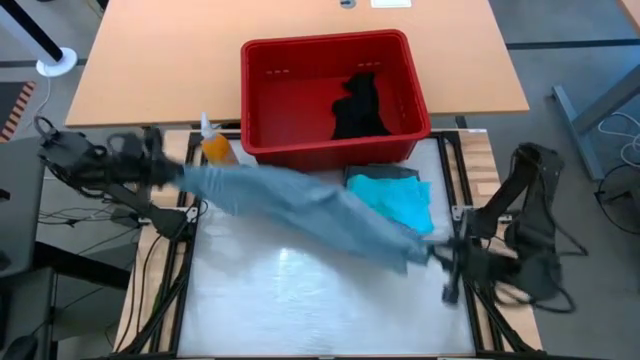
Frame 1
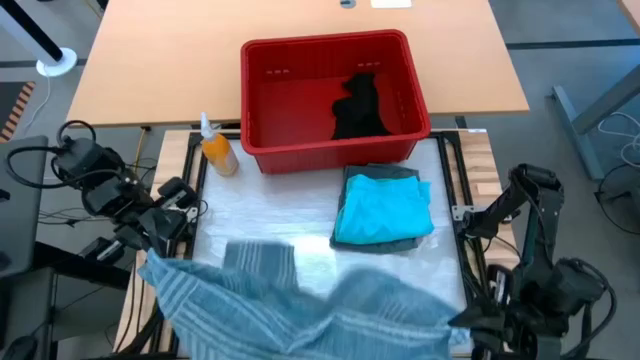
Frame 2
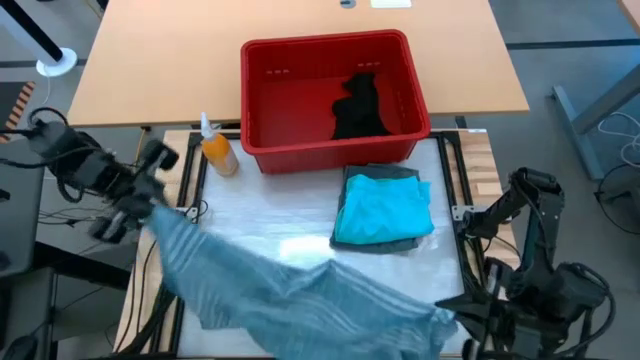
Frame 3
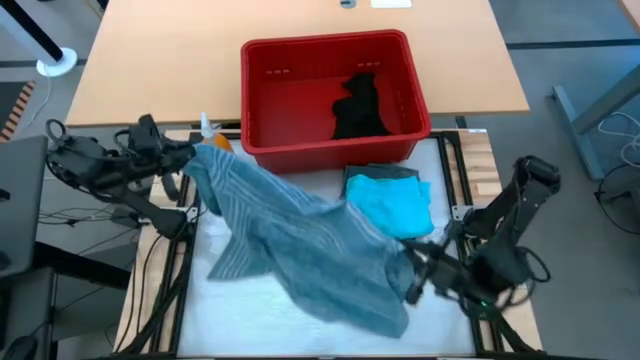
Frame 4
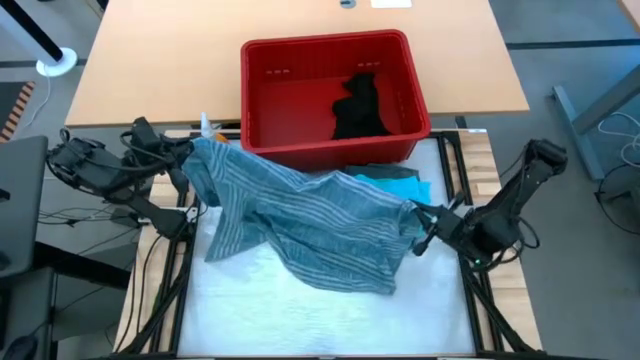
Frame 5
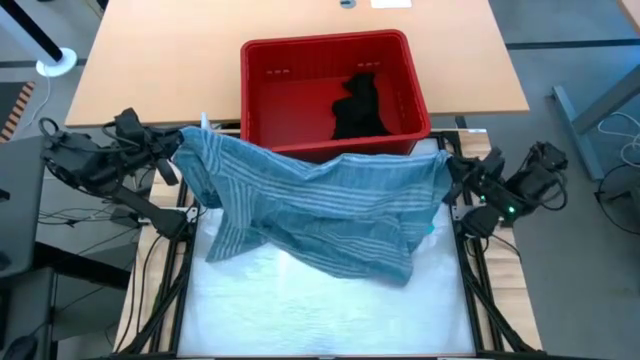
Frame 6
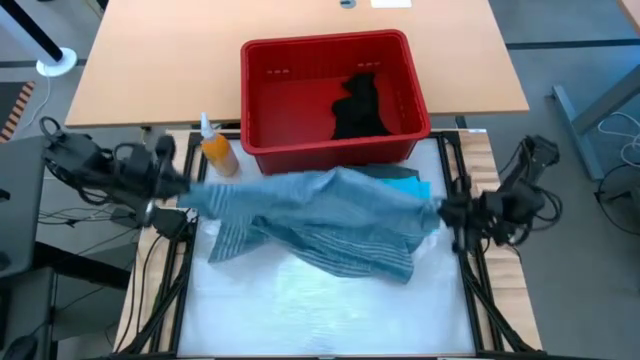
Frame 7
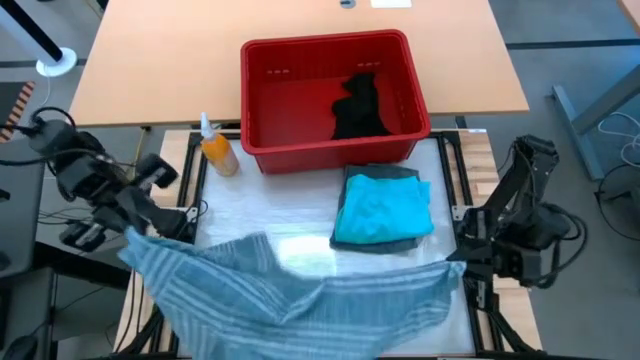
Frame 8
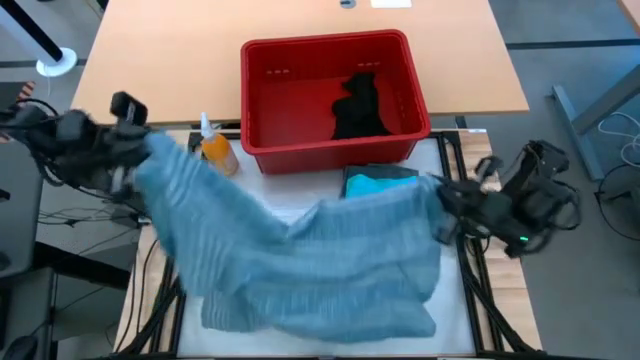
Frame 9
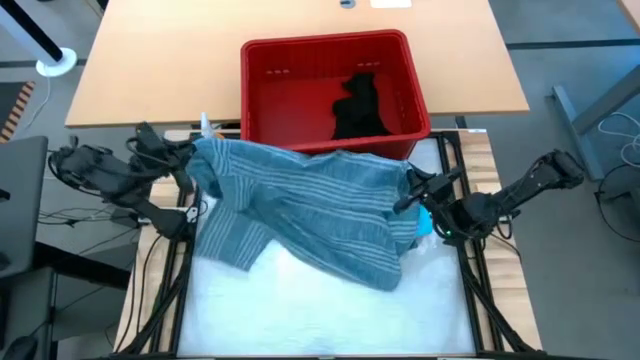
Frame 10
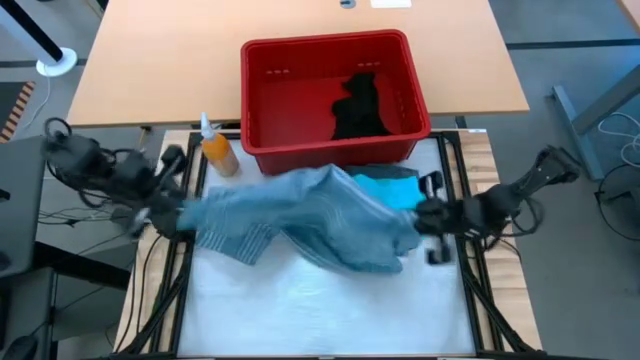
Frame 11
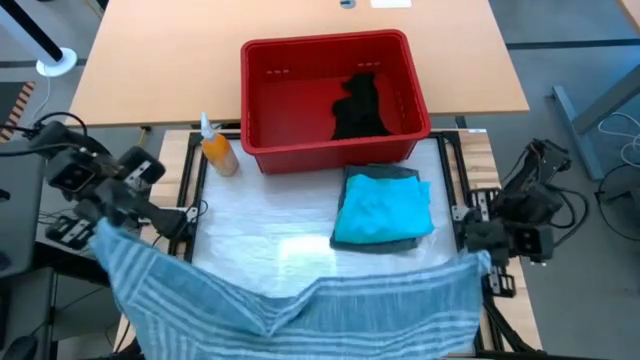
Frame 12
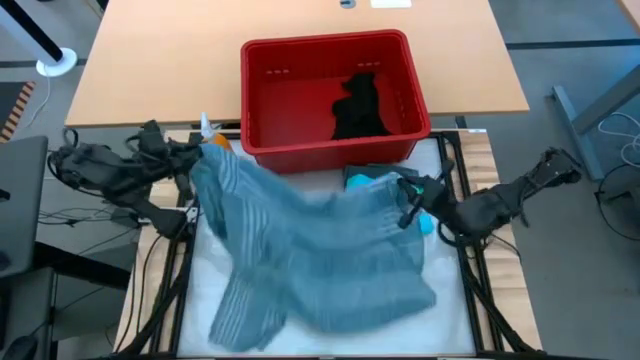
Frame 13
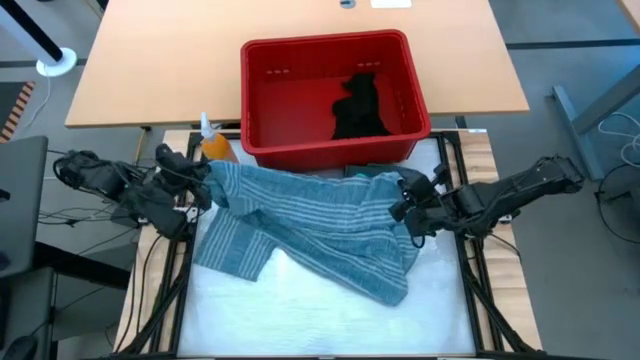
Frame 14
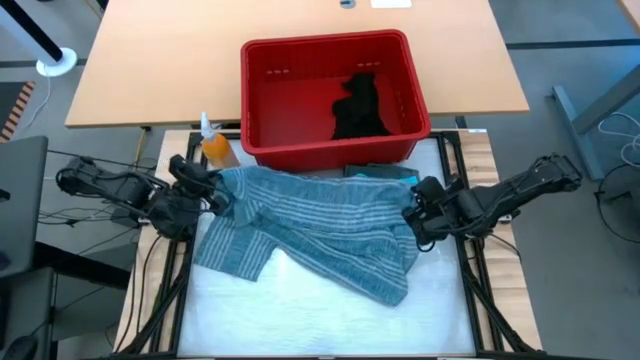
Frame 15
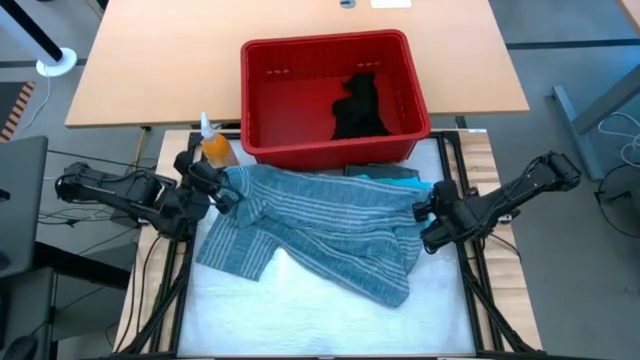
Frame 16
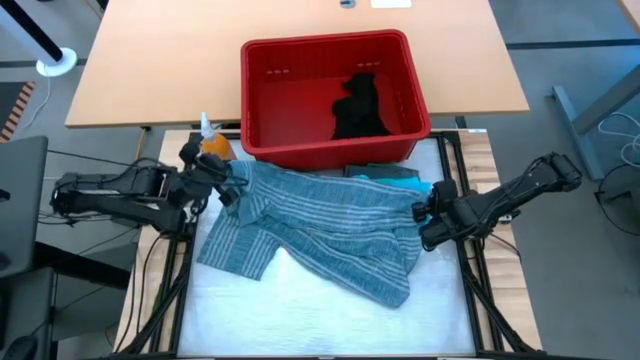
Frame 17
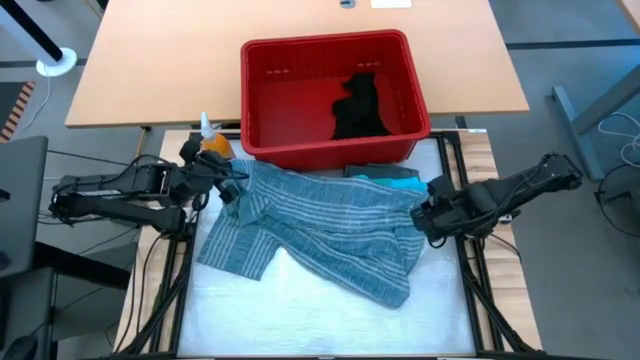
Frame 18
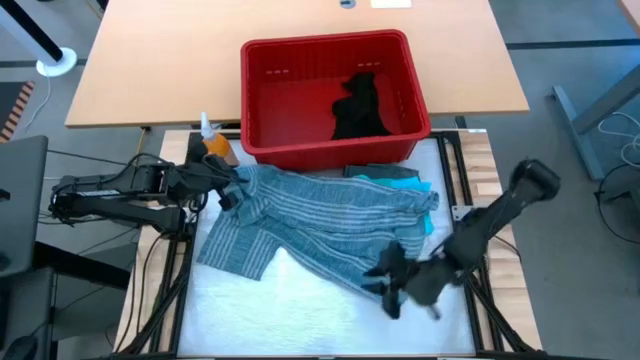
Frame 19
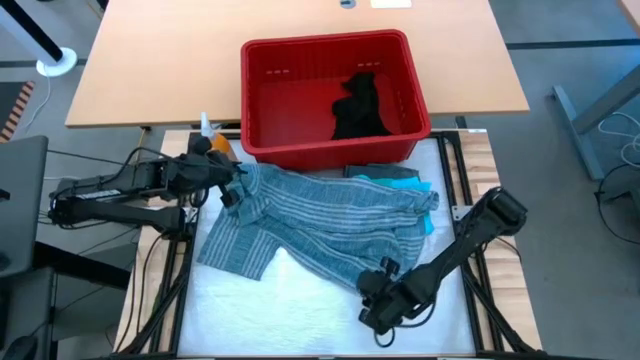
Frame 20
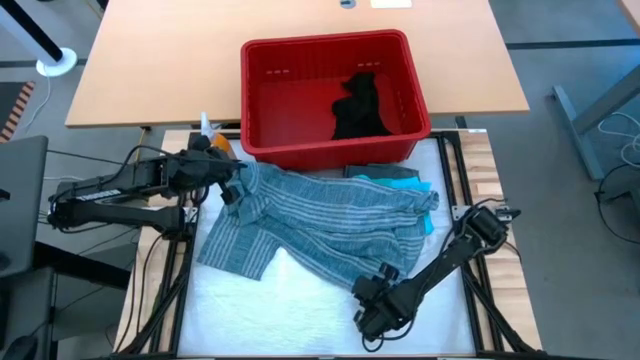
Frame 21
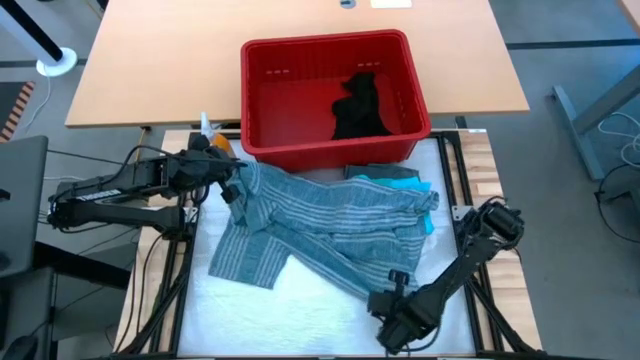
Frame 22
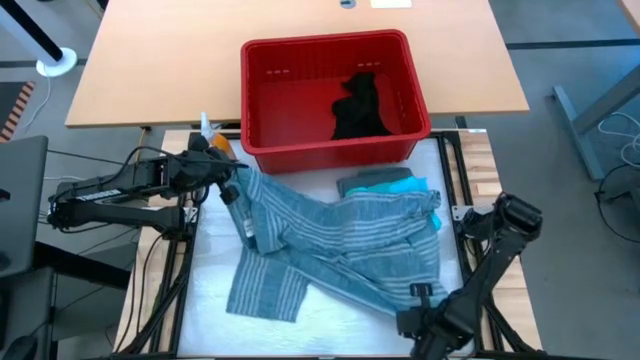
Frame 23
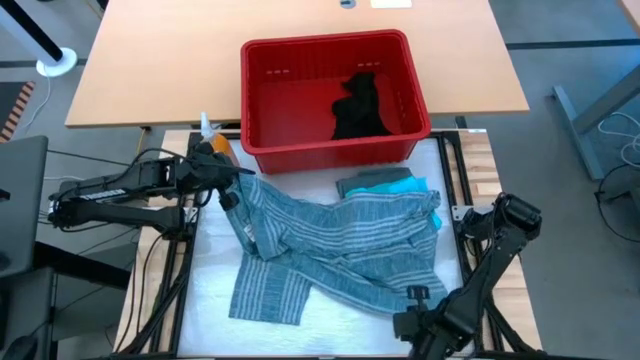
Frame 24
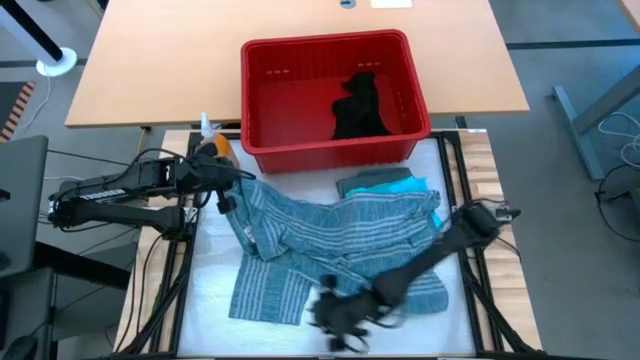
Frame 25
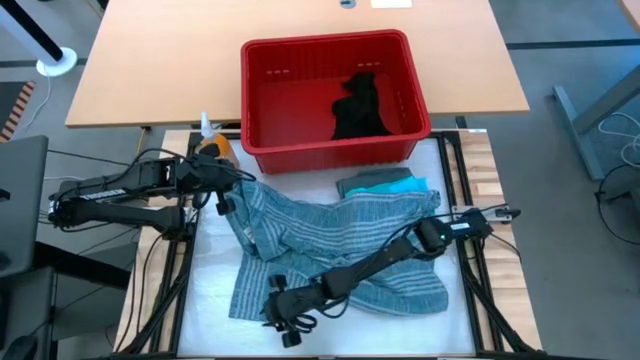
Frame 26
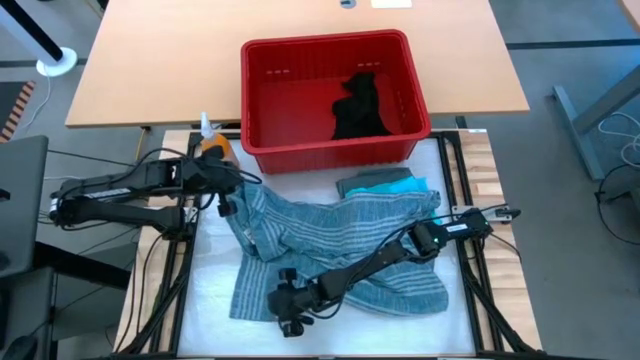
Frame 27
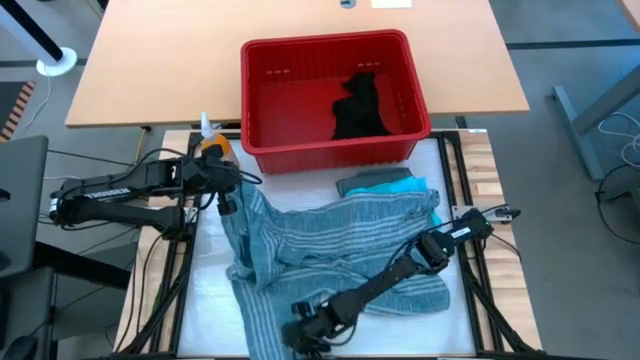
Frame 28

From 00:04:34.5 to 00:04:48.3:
Task: Fold Laundry from Bin
Fold the blue patterned polo shirt

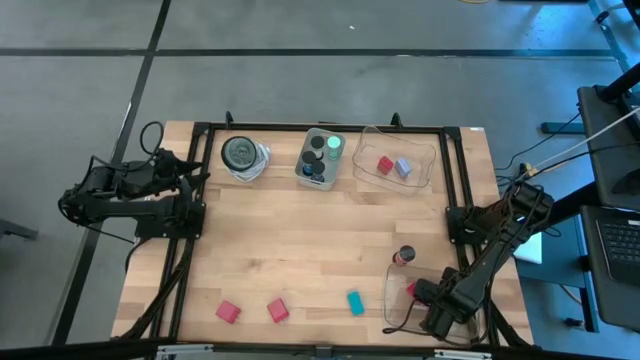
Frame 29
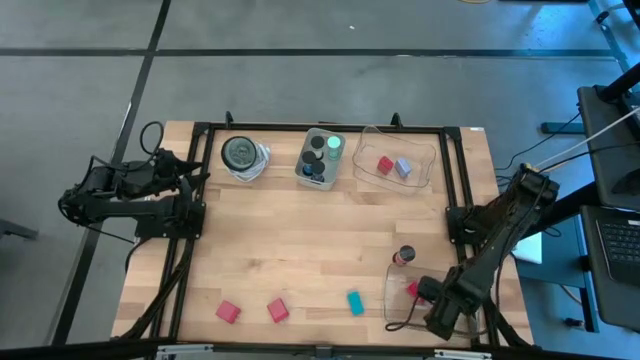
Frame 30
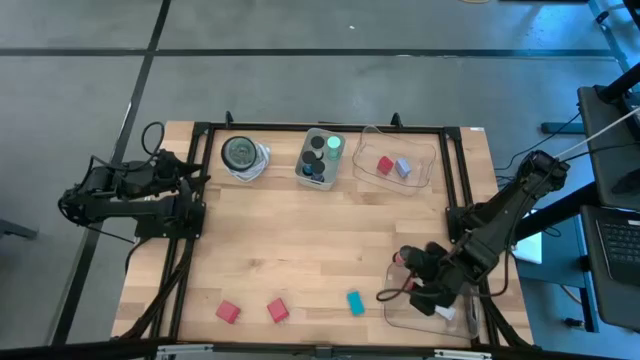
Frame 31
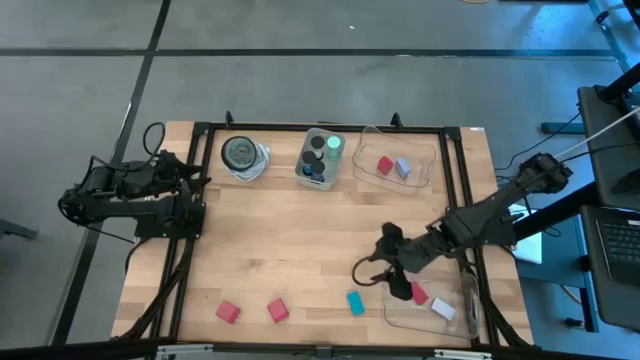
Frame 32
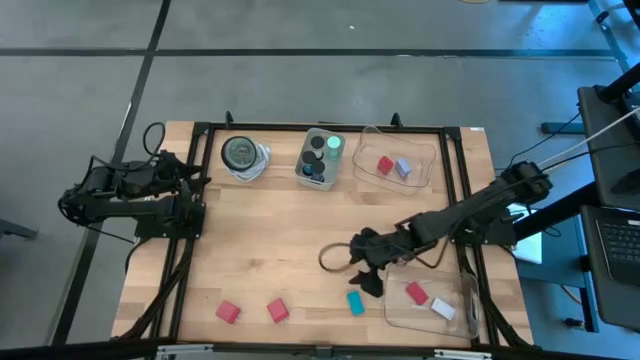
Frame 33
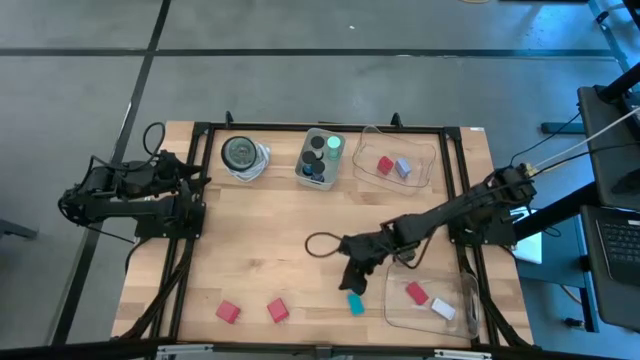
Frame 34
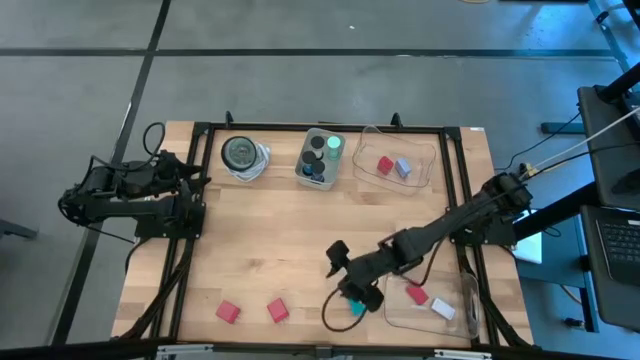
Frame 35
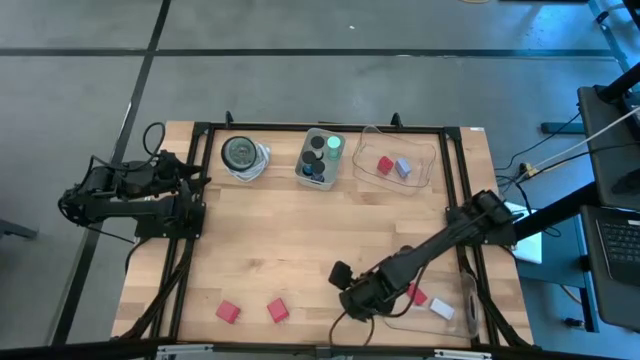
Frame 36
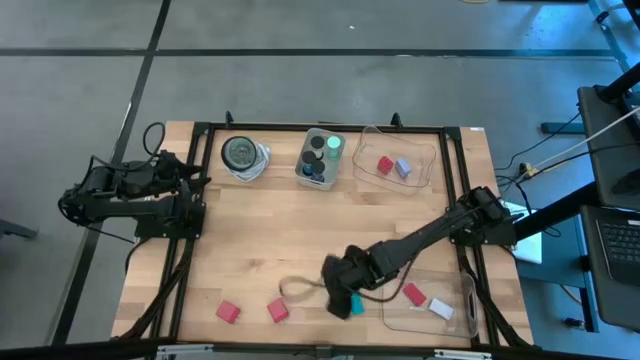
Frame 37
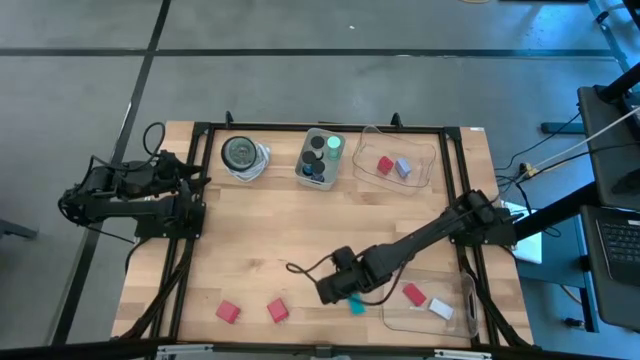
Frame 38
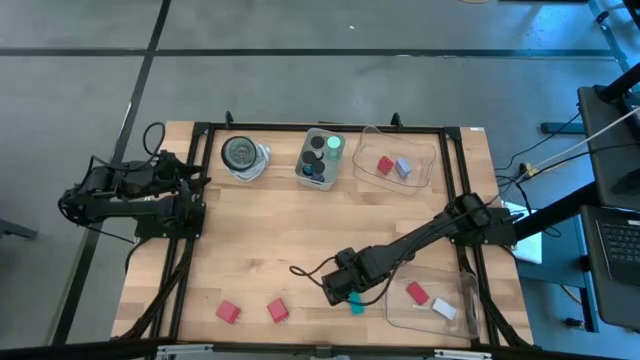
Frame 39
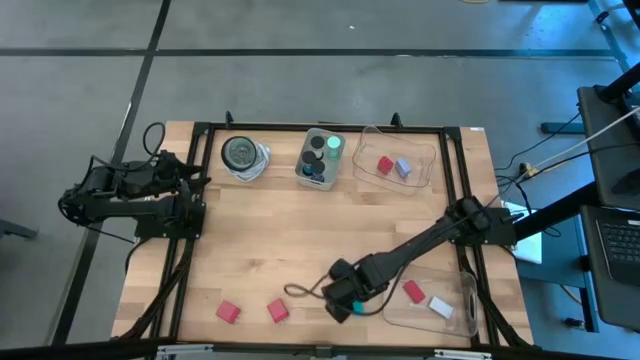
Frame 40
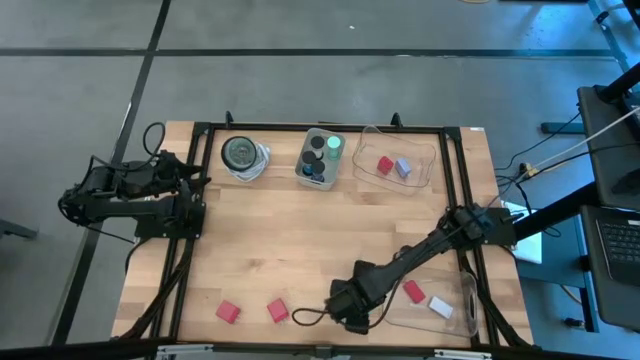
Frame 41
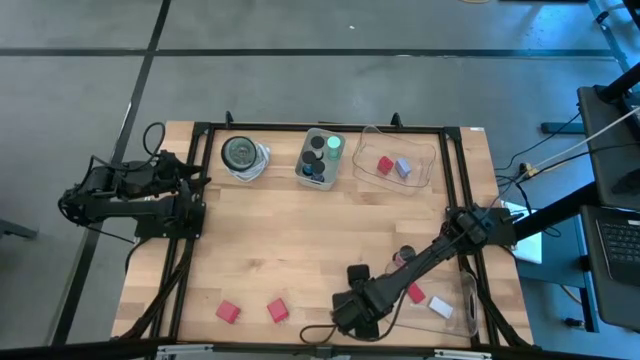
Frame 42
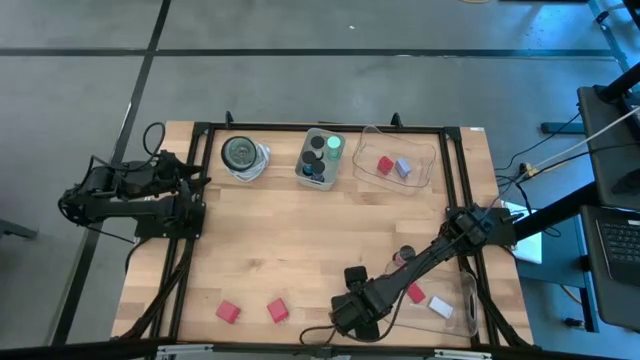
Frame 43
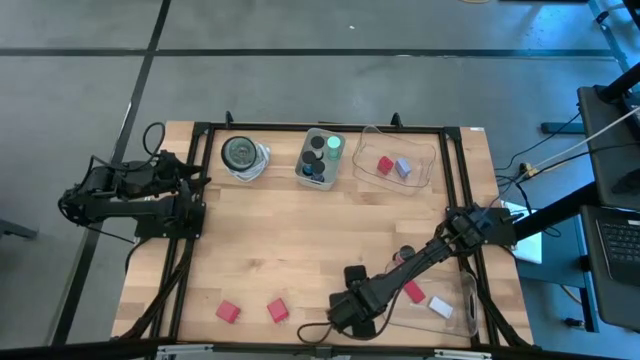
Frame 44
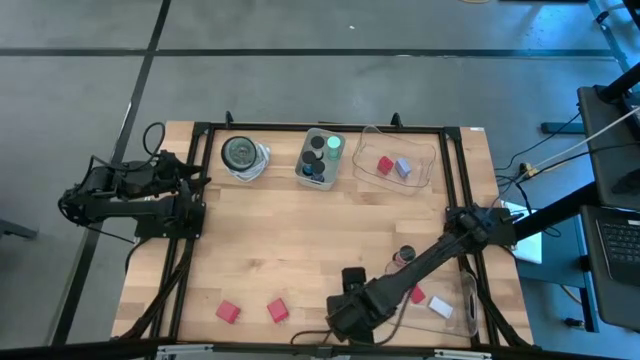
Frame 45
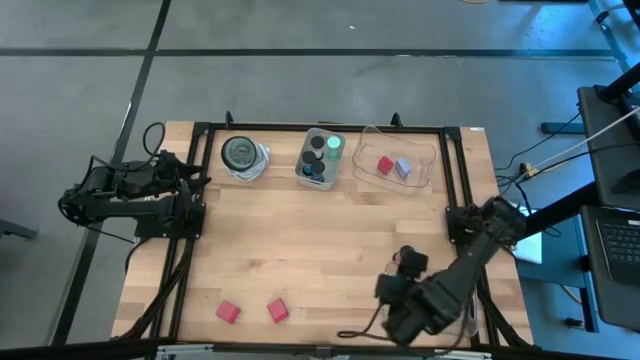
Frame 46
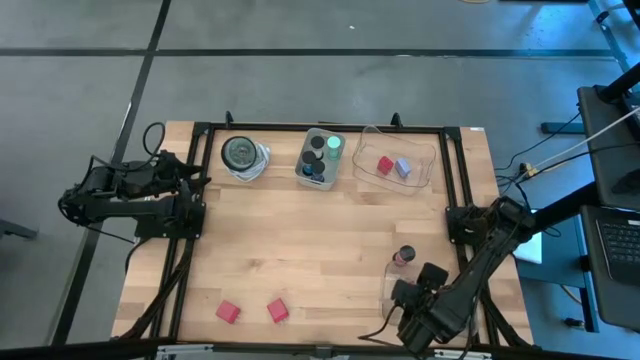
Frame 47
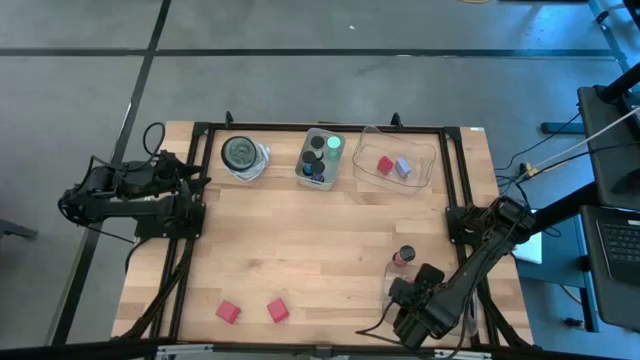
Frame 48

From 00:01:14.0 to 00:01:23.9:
Task: Pick & Place Office items
Put the blue digital timer into the bottom transparent bin
